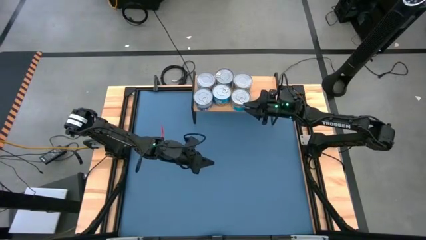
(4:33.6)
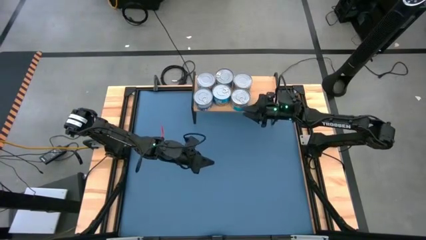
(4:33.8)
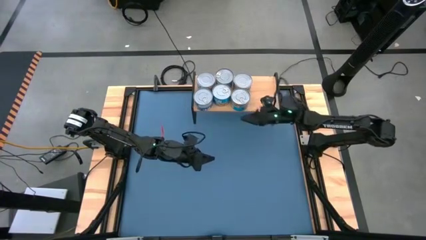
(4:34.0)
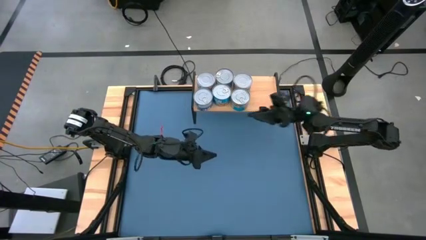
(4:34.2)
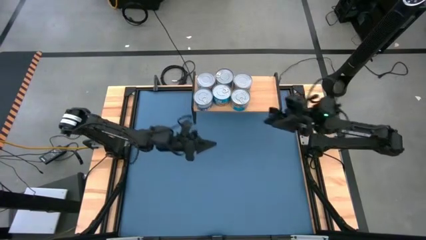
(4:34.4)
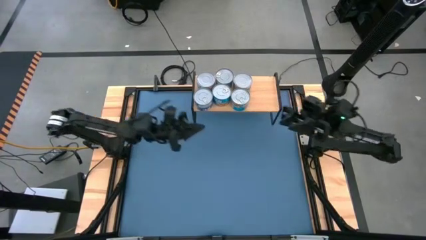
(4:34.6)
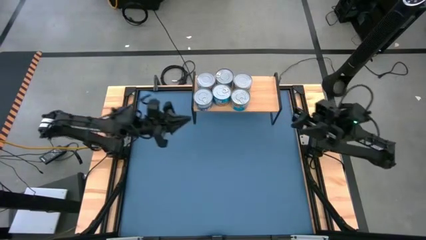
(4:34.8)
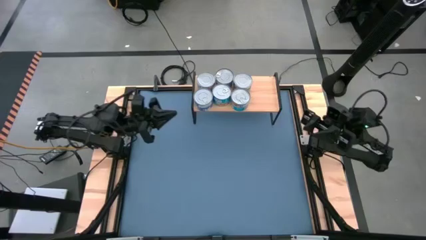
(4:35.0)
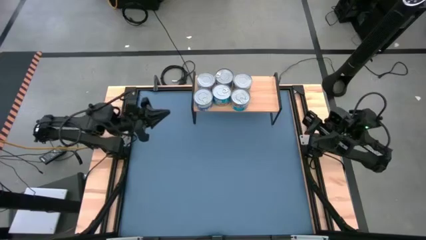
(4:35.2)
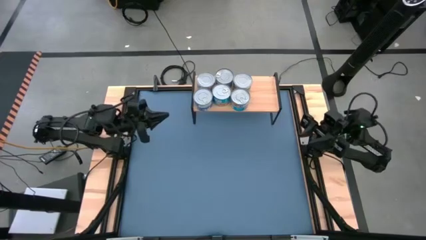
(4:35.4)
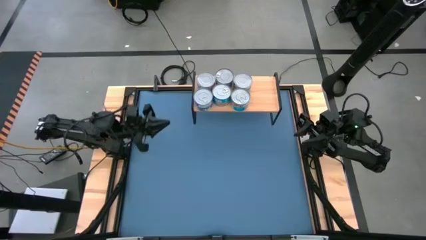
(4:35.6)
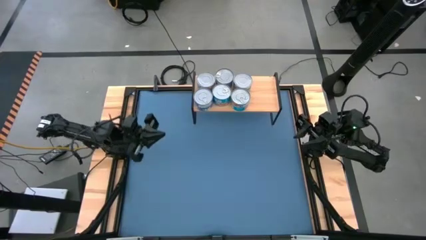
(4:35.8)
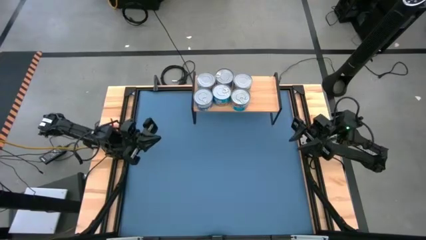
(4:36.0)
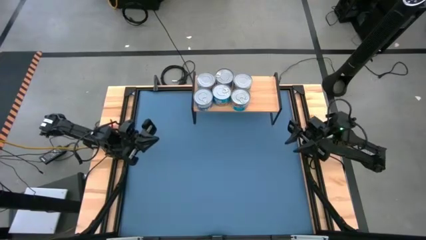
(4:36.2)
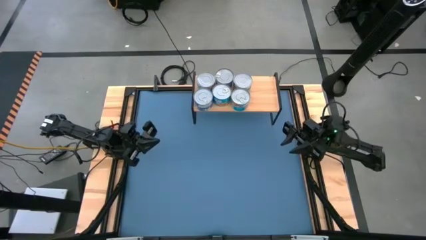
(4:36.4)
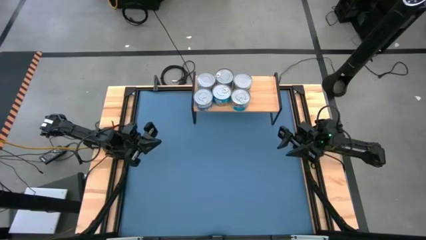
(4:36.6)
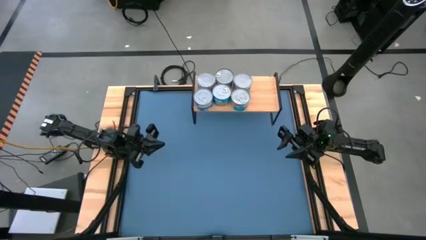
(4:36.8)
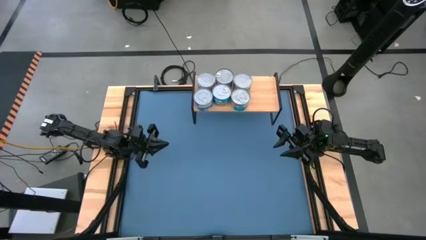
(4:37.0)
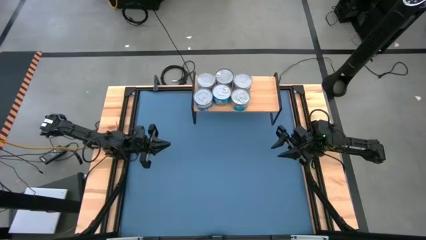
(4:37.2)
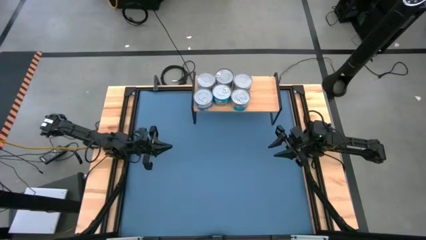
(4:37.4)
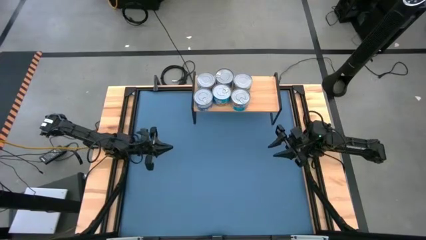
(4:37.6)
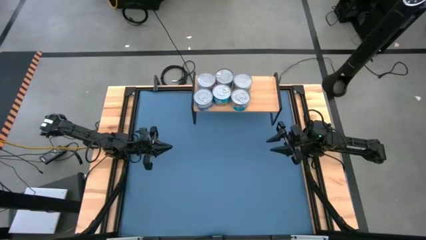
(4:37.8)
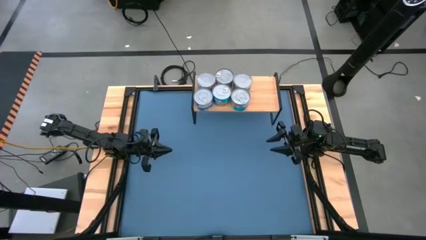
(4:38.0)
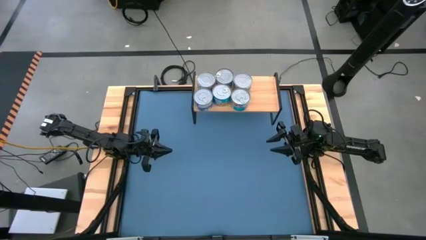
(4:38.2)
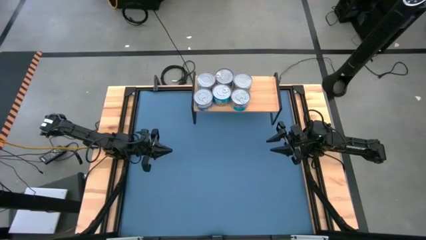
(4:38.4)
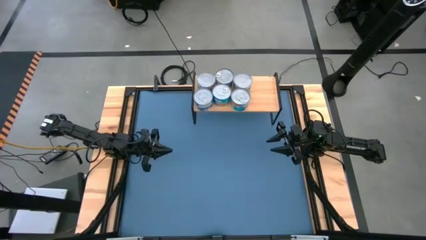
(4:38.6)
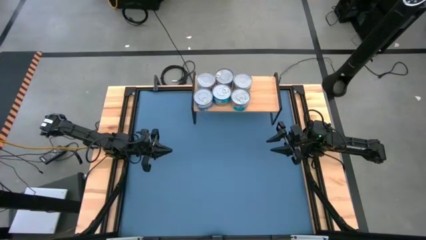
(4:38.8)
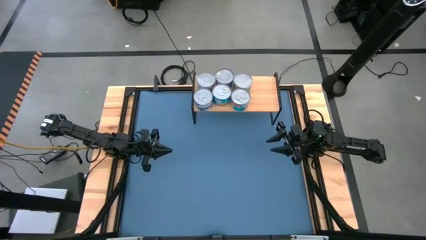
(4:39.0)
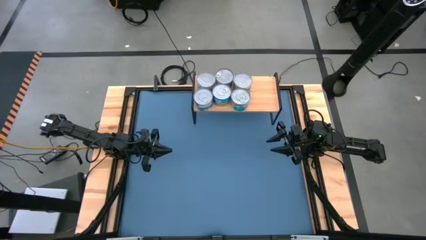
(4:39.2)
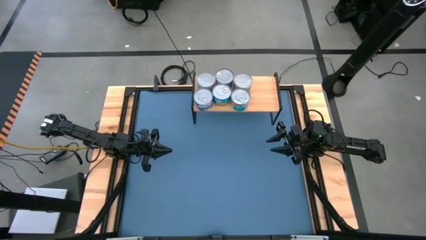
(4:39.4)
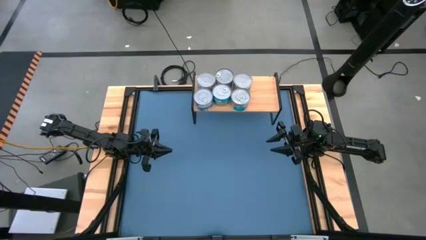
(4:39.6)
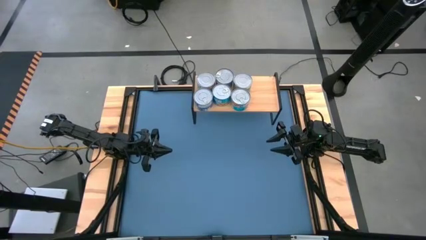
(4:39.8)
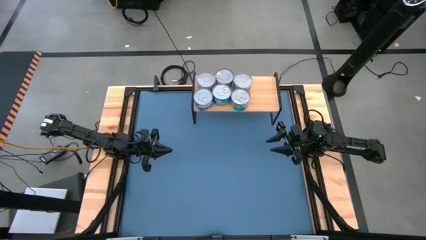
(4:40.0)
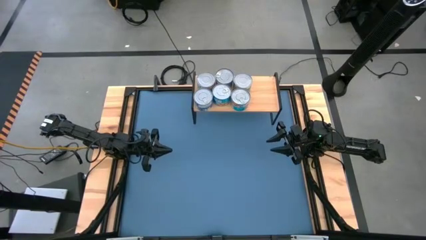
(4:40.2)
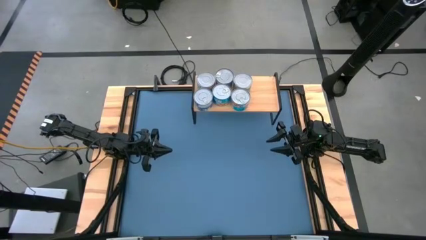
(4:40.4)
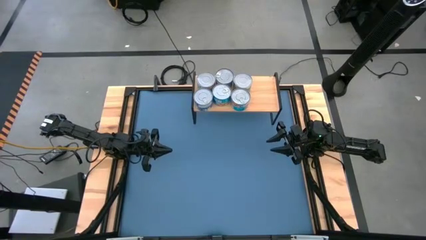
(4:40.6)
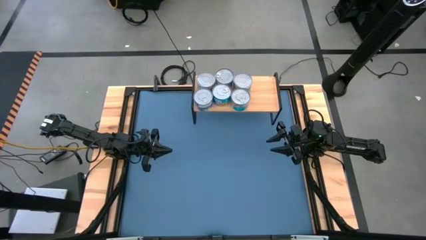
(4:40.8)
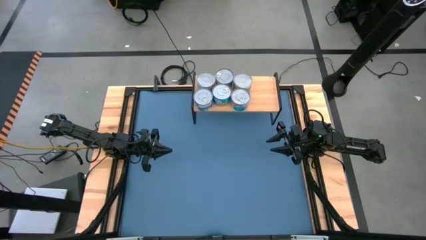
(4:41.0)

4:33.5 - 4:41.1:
Task: Stack canned seafood by type on shelf
Return to Home Position

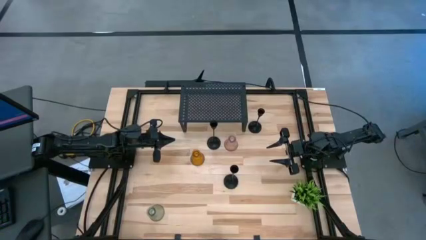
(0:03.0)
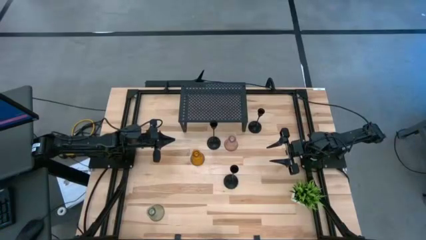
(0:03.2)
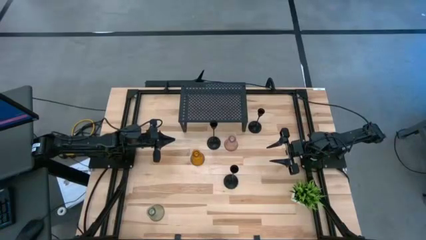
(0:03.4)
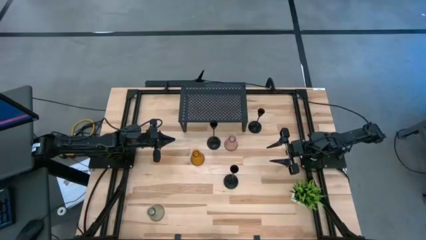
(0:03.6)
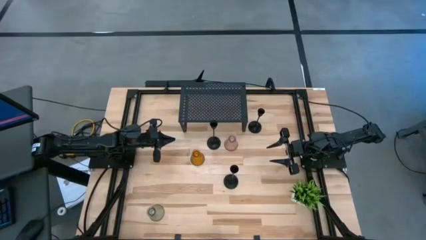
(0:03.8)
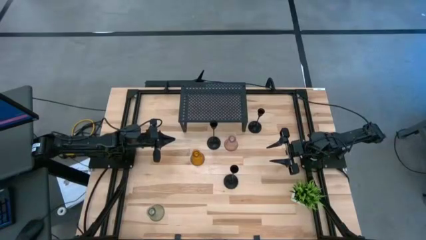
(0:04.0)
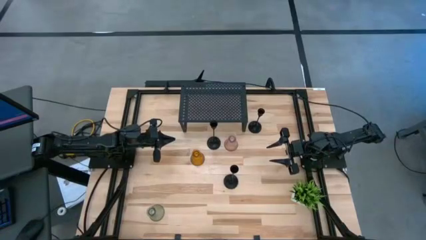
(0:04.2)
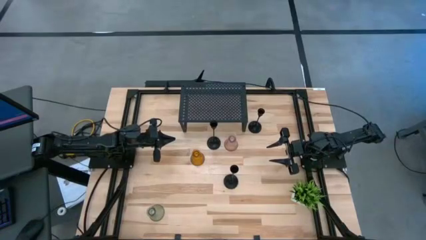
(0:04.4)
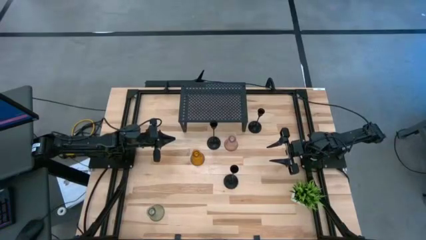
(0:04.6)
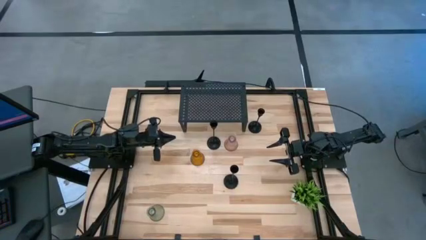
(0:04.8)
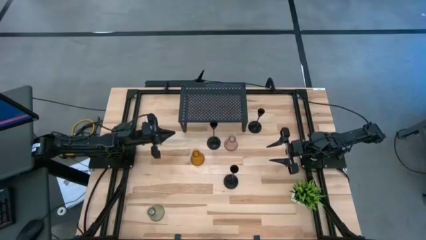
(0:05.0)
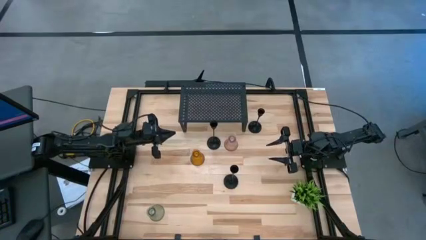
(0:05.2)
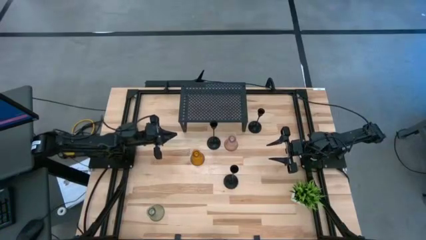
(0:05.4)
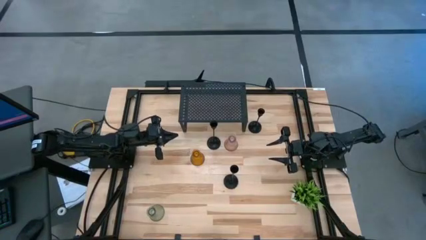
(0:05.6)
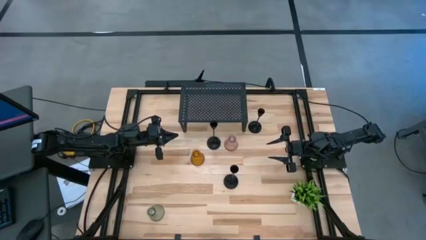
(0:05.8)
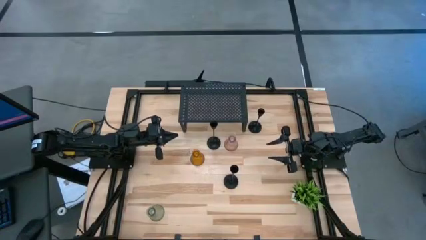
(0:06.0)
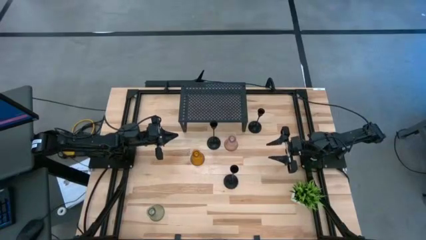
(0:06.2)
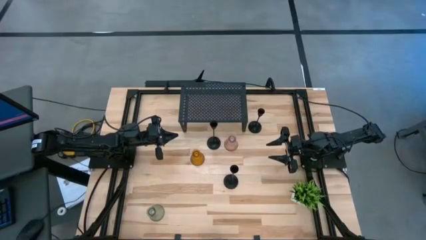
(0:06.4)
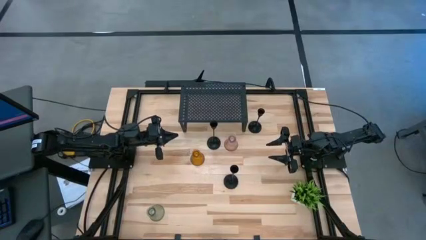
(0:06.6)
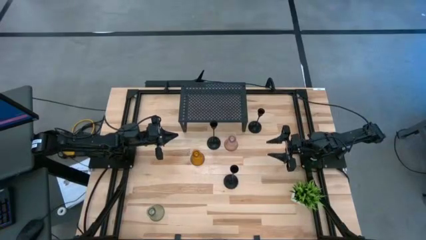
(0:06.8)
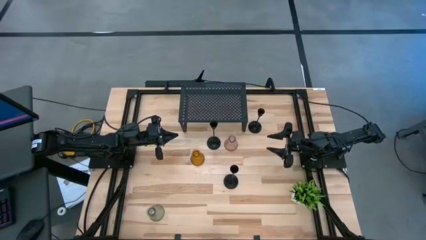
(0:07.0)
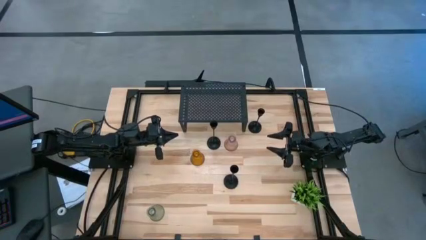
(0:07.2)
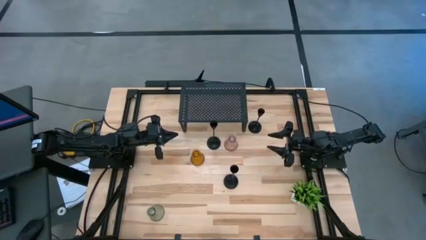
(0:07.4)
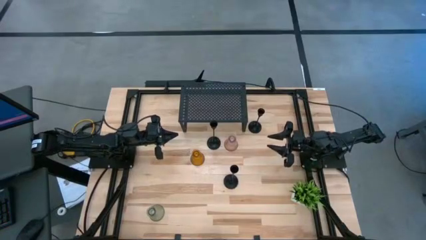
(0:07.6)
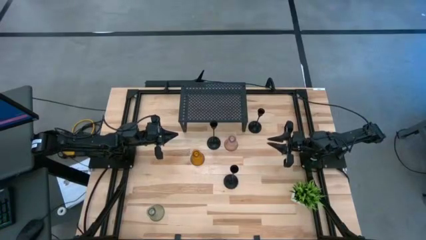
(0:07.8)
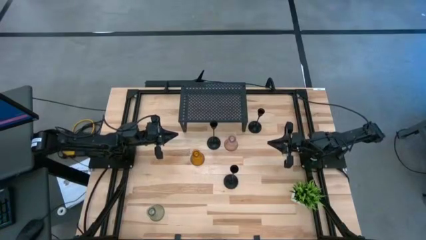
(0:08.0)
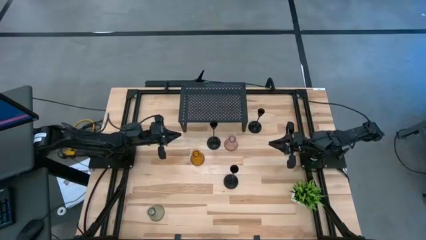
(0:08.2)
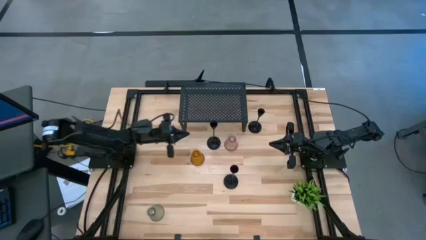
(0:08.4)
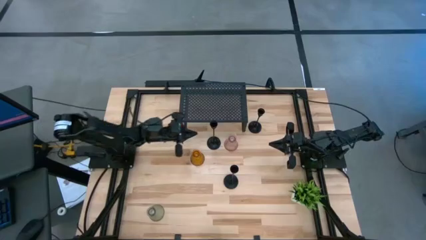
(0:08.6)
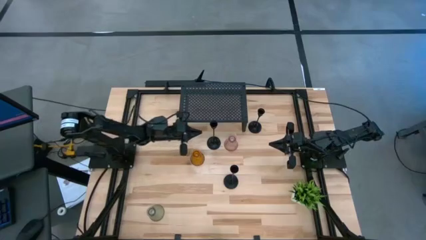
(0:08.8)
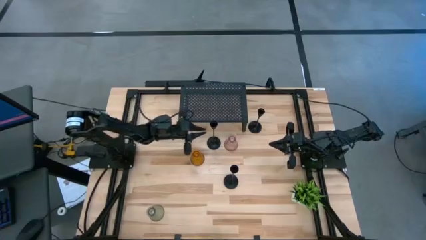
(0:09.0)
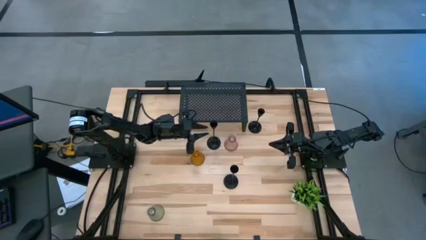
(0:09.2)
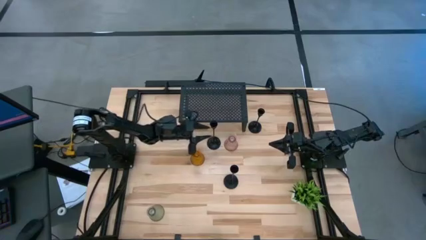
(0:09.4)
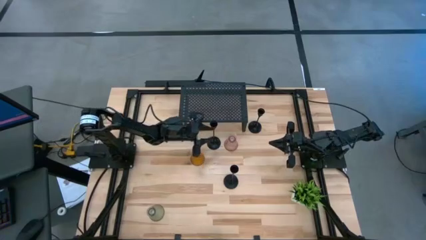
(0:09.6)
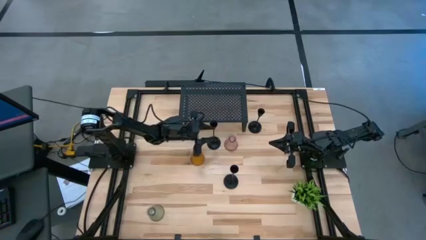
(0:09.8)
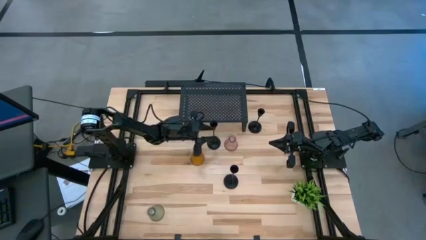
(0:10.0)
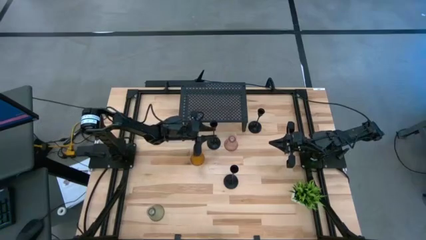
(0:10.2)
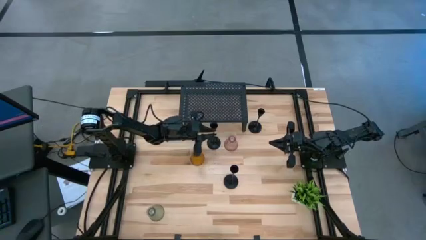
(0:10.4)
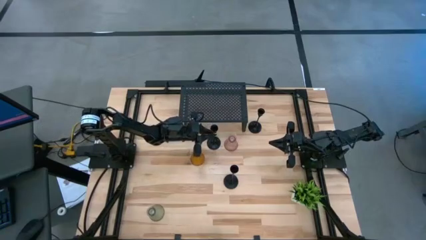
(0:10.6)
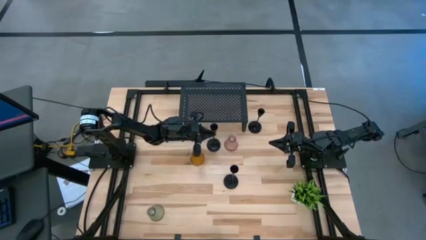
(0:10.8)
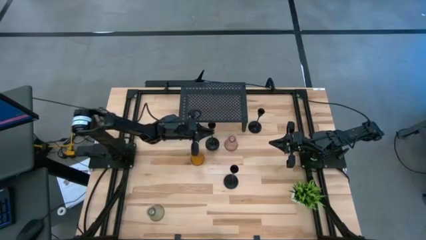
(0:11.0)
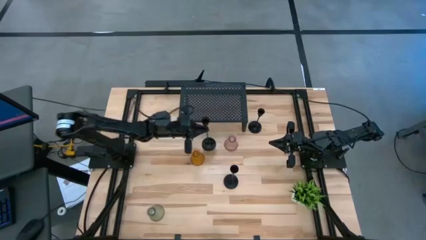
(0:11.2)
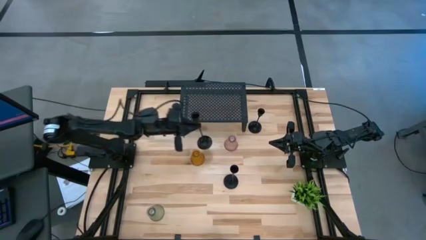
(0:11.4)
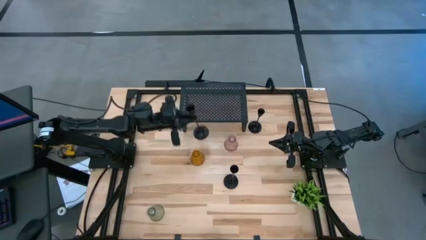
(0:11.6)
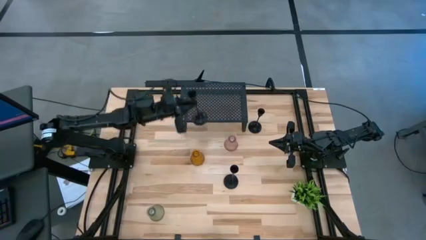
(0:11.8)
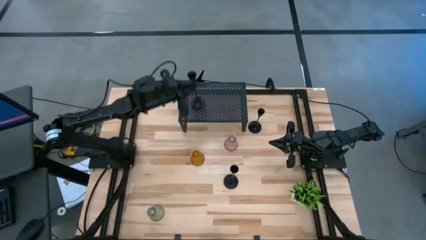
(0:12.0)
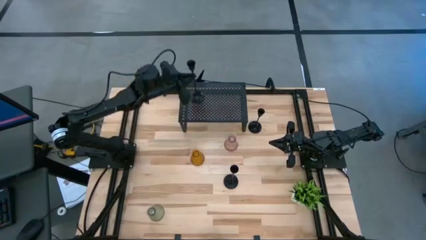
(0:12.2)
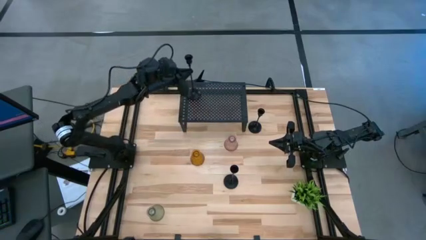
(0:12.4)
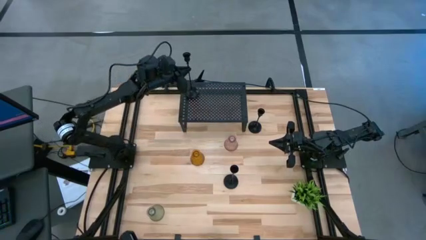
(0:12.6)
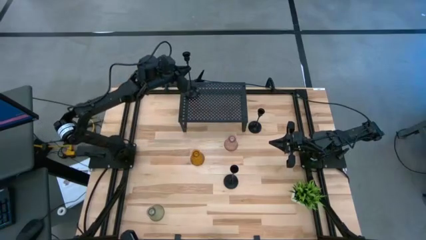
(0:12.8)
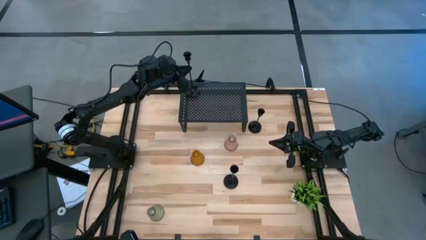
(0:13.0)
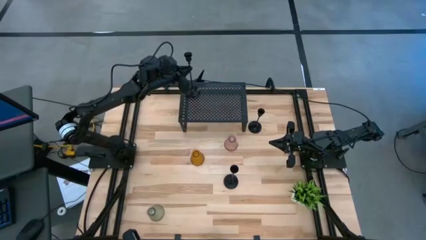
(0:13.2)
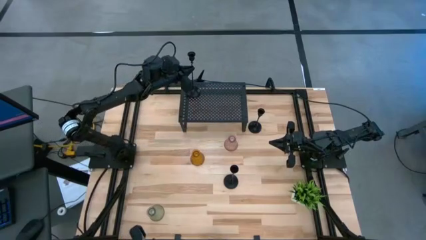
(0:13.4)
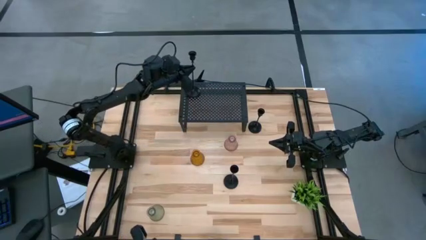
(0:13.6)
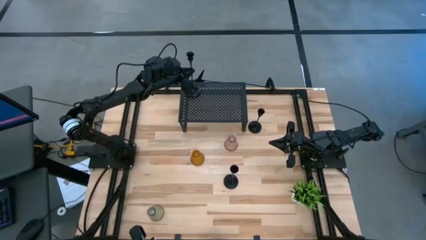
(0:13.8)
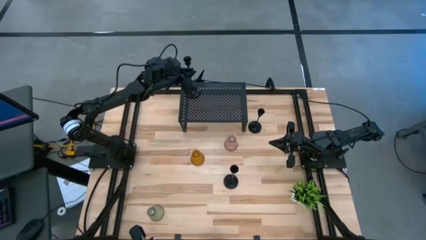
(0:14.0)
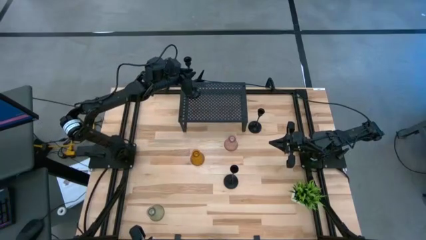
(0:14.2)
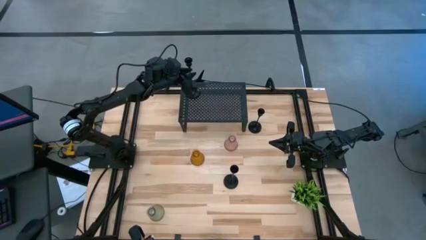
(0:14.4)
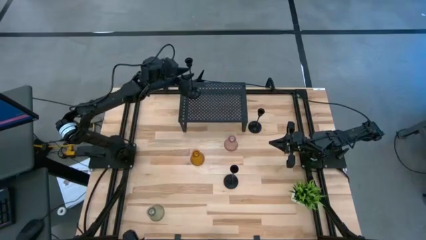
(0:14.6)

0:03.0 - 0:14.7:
Task: Pick & Place candle stick holders
Put the left black candle holder on the shelf
